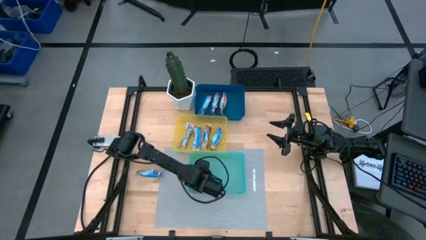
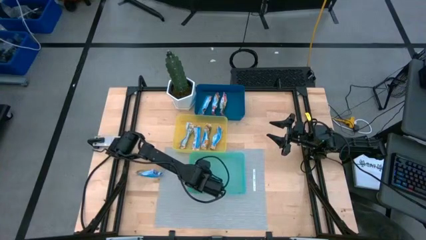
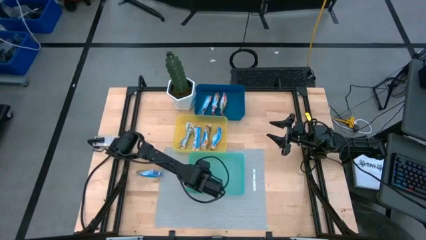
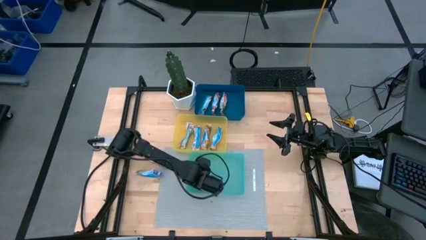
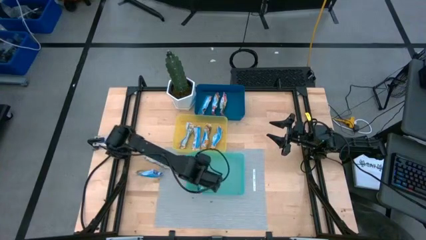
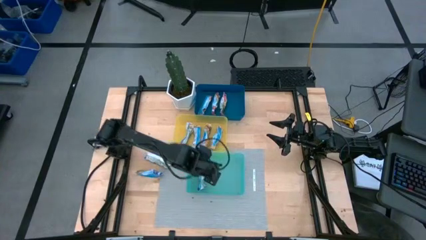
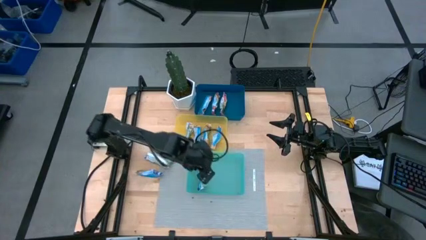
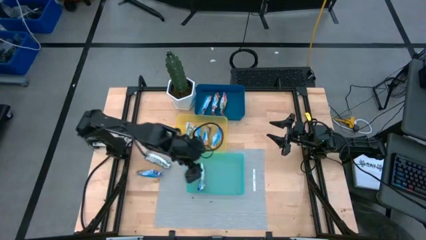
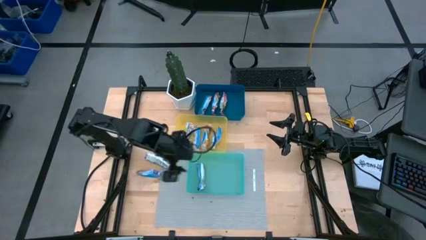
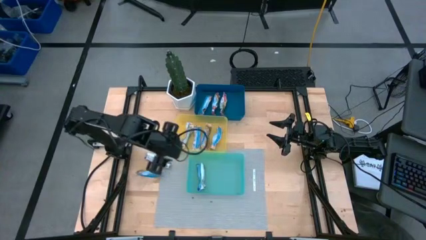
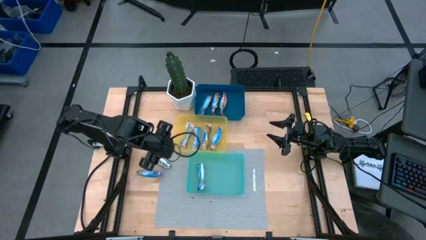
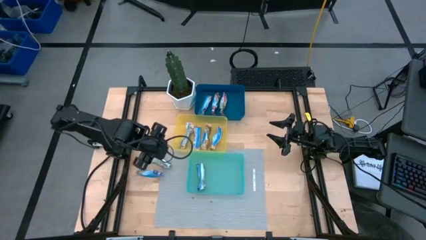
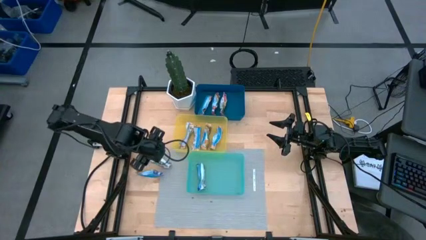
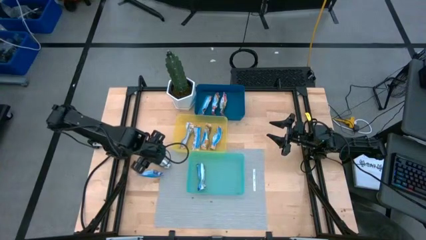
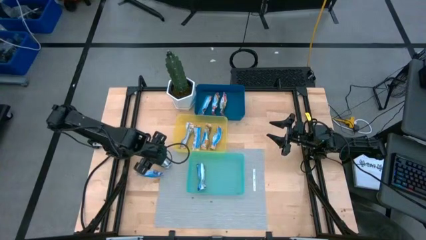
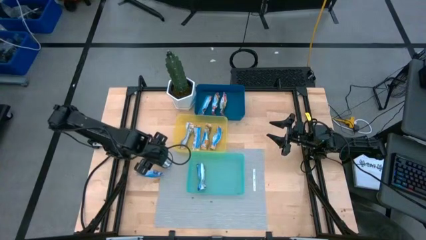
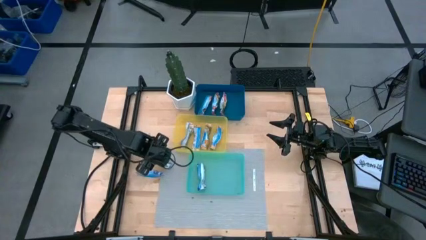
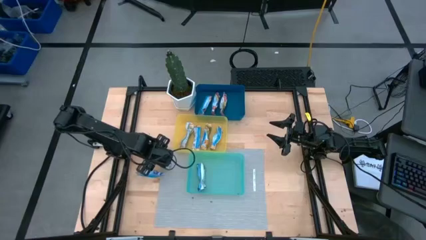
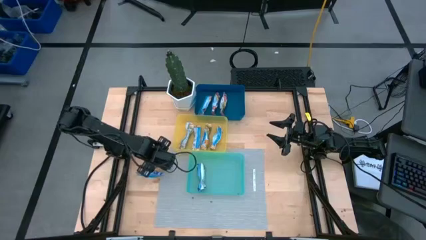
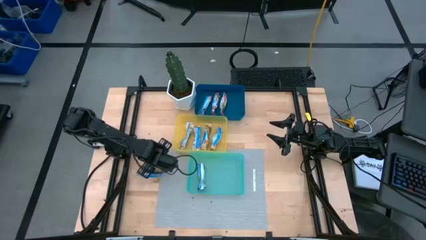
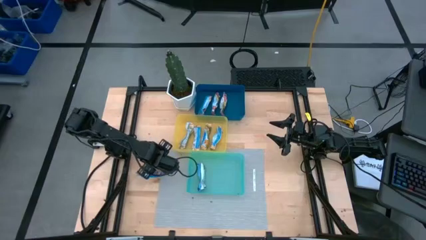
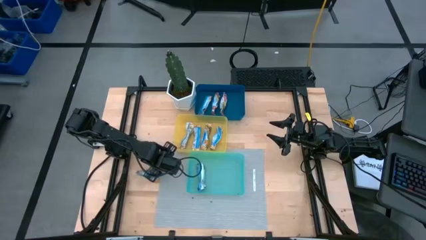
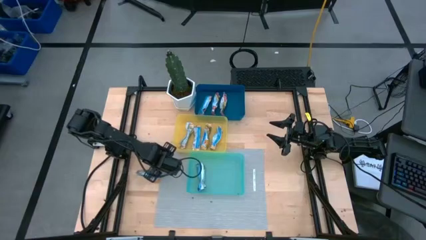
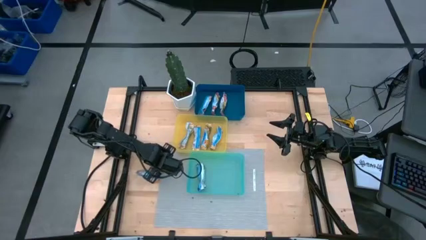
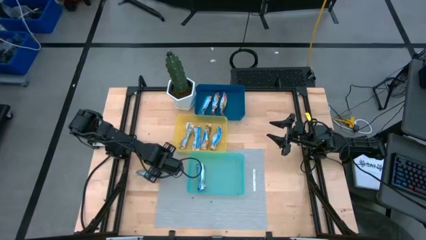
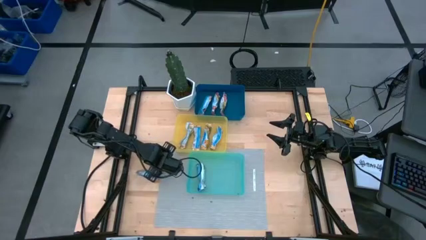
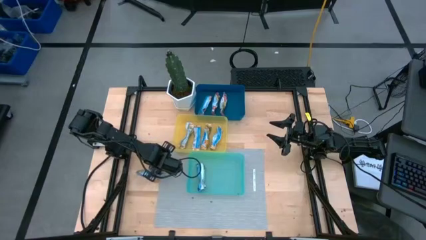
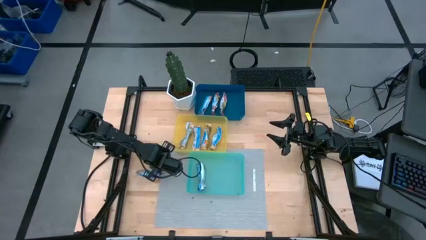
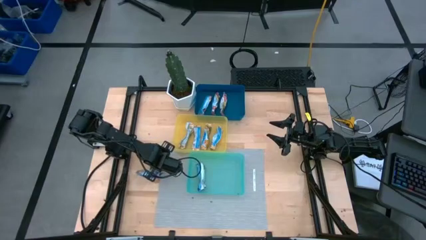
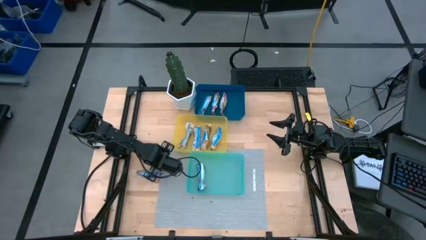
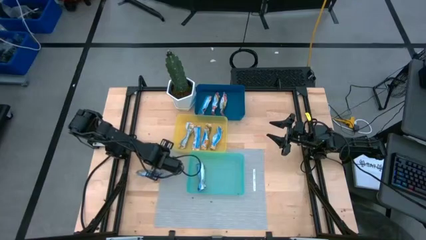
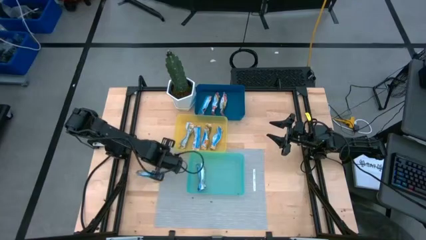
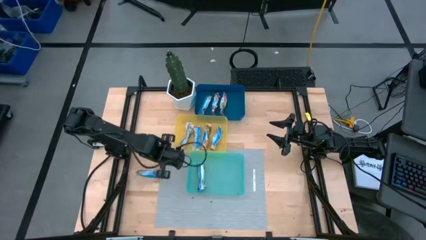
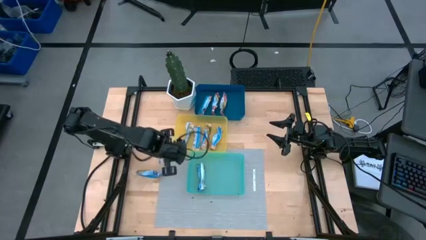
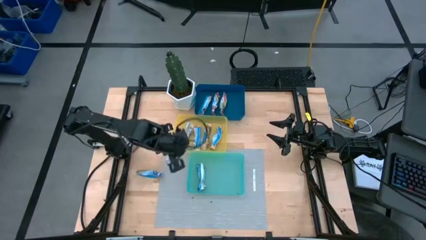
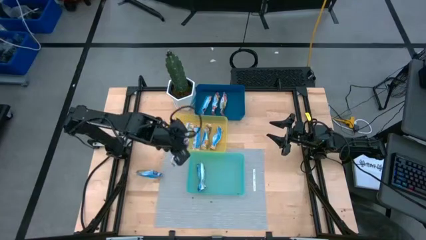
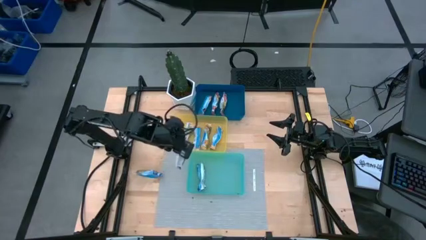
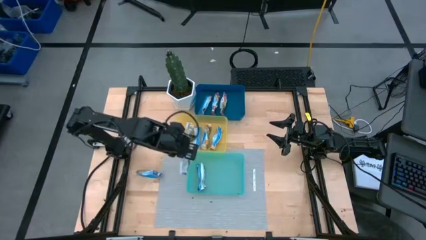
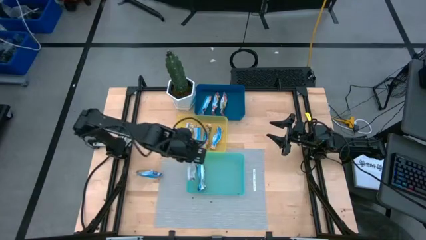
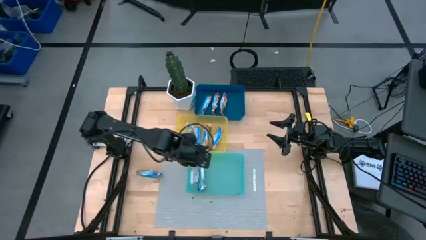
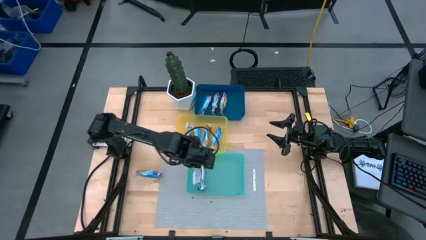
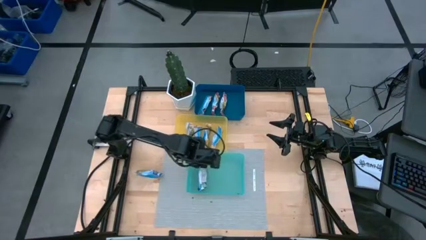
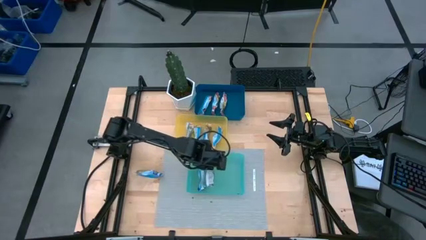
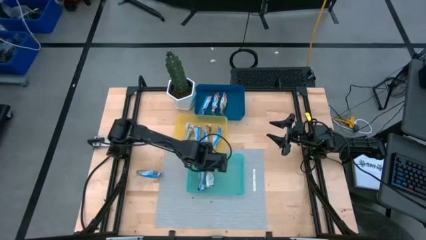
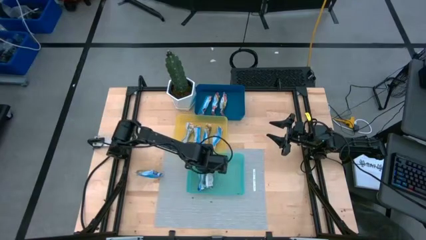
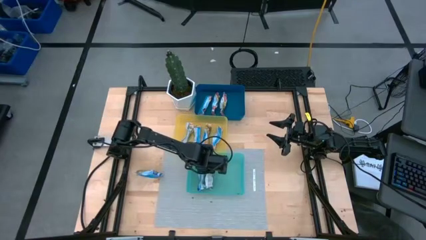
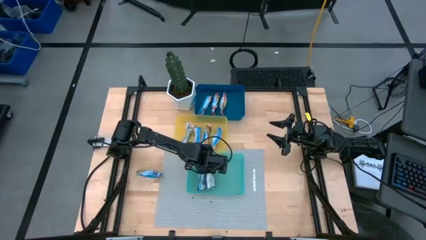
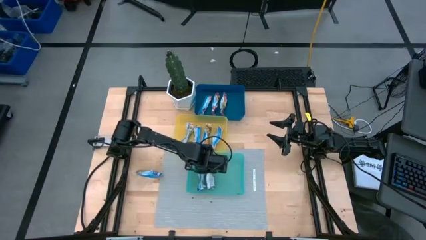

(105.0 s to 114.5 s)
Task: Pick and place Granola Bars by type
Put the blue granola bar into the green bin
